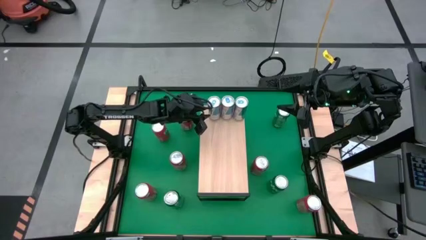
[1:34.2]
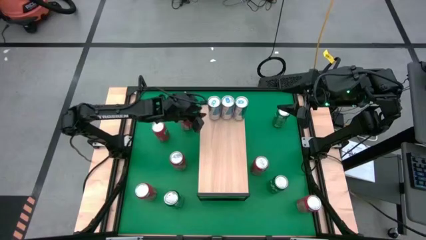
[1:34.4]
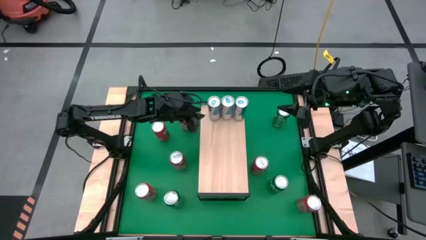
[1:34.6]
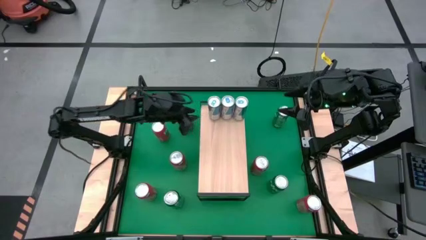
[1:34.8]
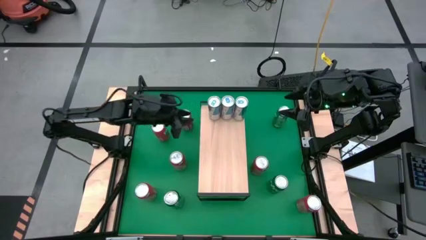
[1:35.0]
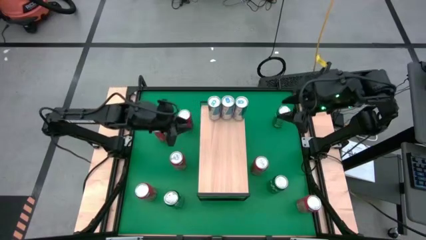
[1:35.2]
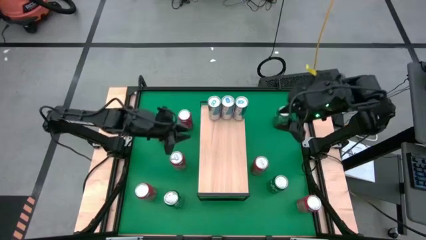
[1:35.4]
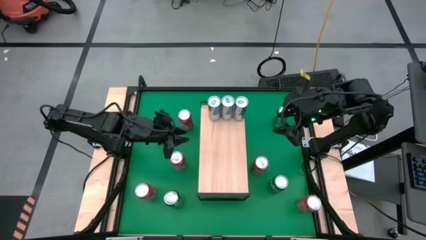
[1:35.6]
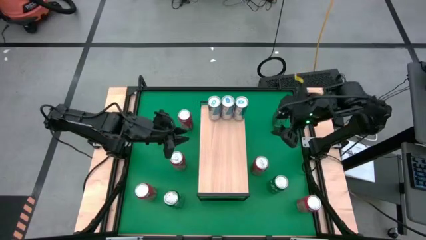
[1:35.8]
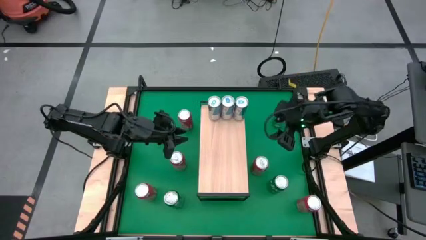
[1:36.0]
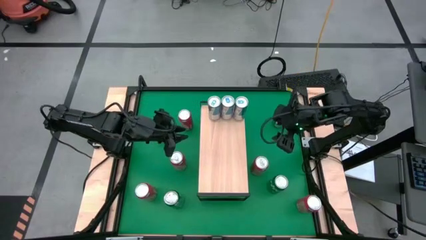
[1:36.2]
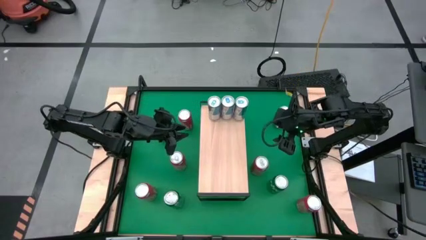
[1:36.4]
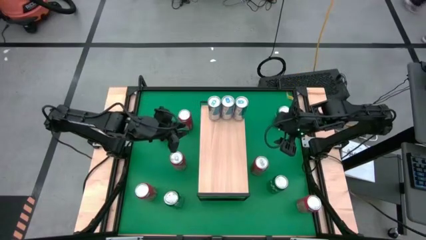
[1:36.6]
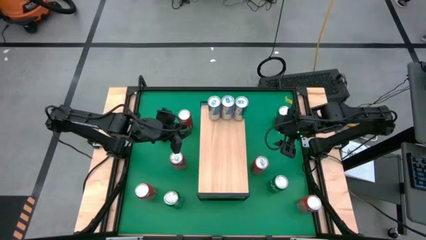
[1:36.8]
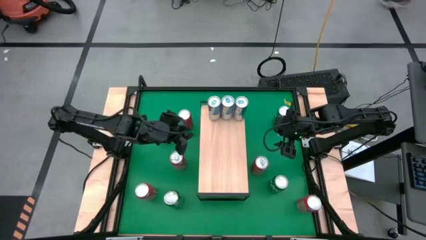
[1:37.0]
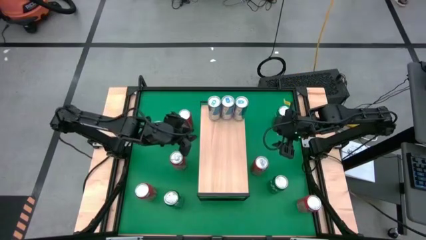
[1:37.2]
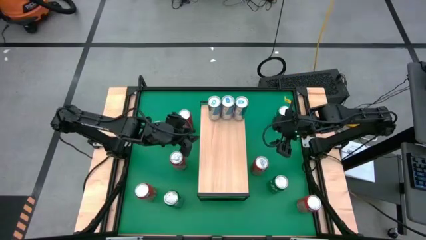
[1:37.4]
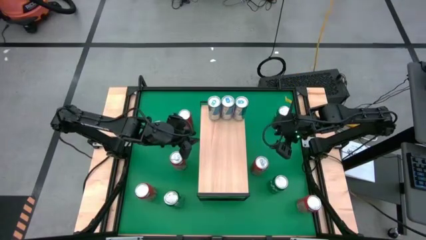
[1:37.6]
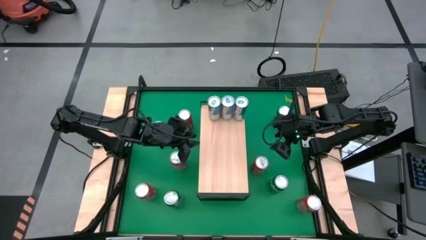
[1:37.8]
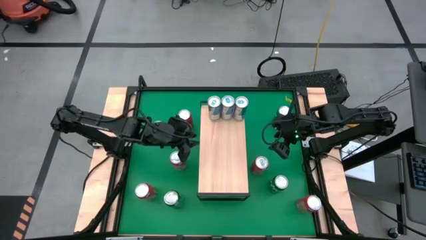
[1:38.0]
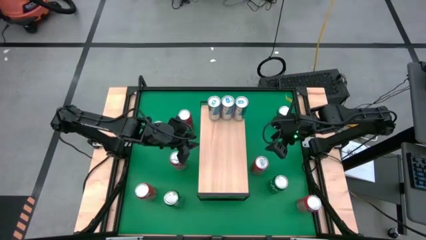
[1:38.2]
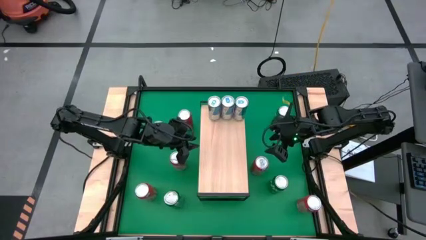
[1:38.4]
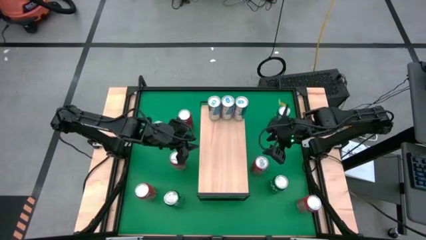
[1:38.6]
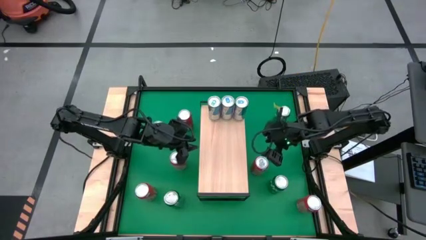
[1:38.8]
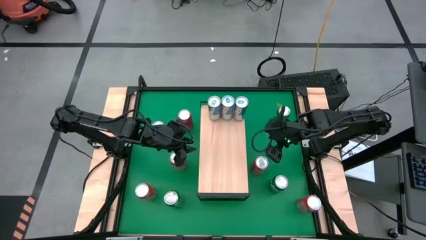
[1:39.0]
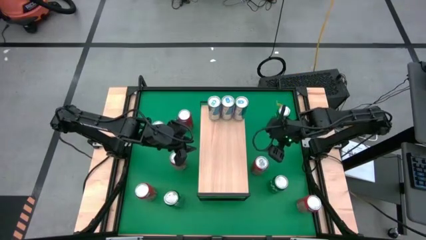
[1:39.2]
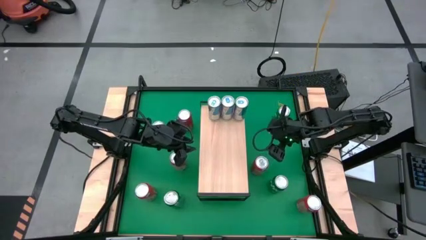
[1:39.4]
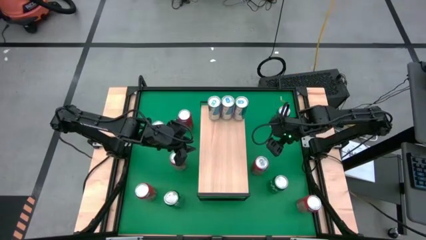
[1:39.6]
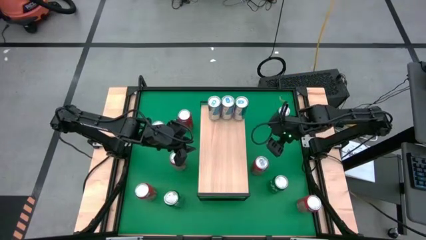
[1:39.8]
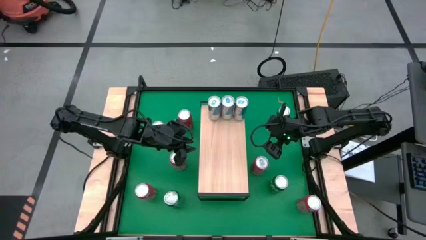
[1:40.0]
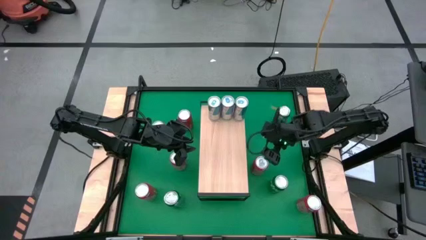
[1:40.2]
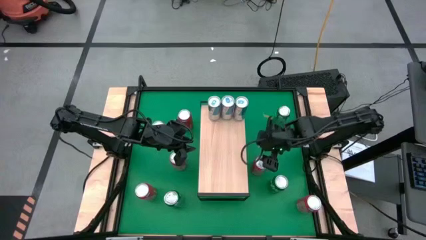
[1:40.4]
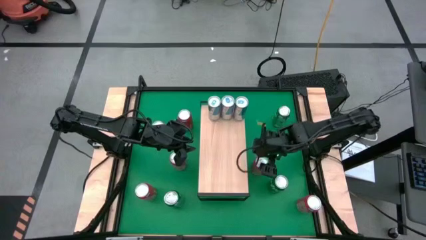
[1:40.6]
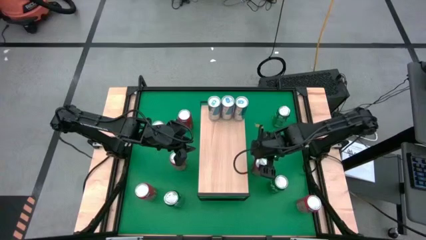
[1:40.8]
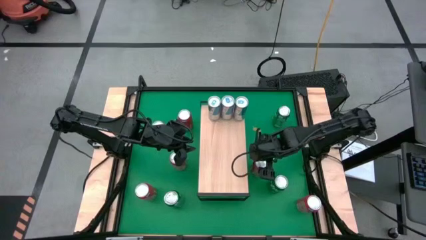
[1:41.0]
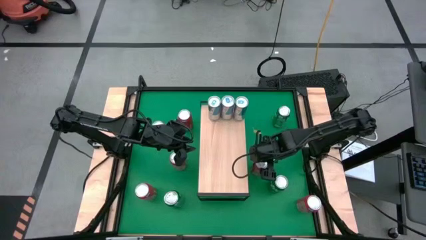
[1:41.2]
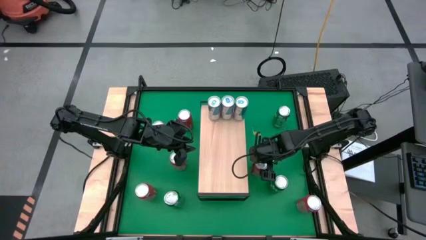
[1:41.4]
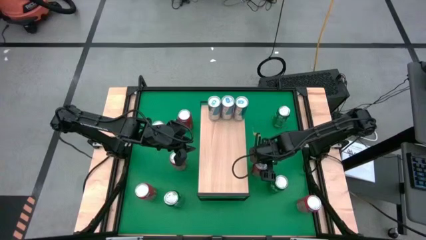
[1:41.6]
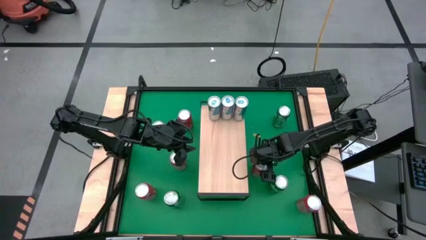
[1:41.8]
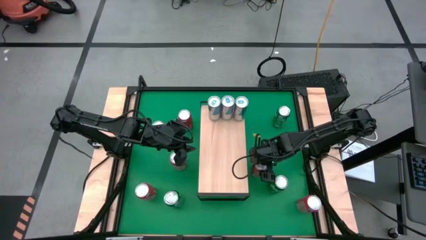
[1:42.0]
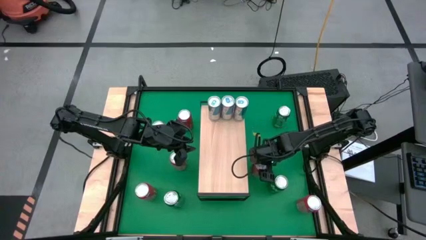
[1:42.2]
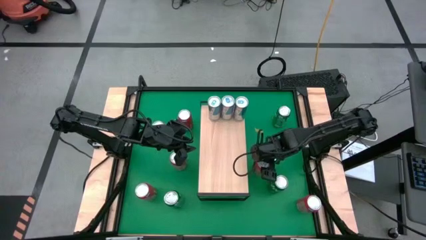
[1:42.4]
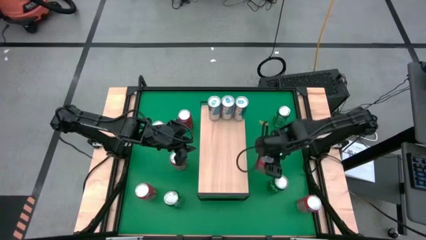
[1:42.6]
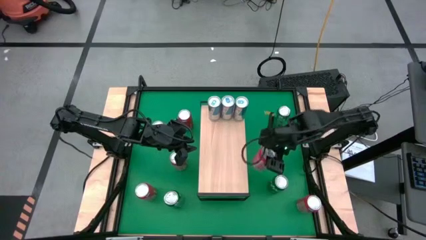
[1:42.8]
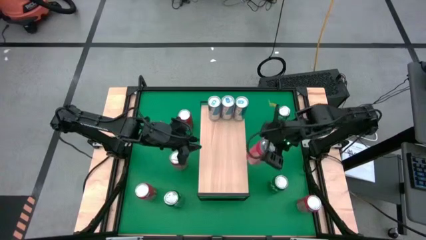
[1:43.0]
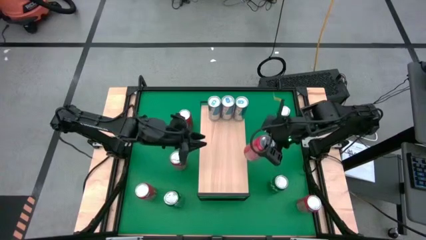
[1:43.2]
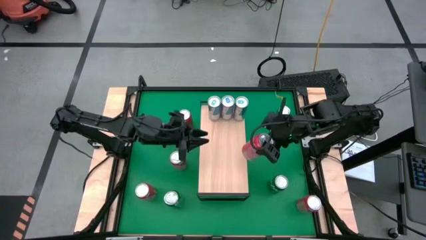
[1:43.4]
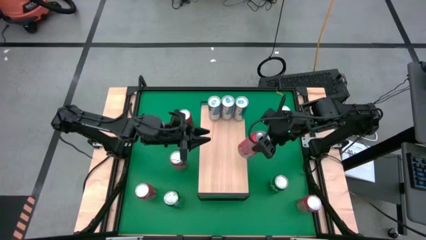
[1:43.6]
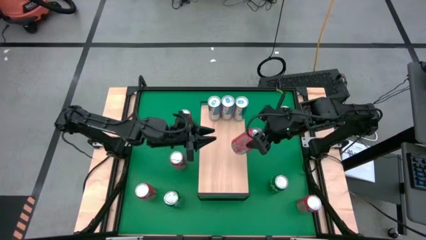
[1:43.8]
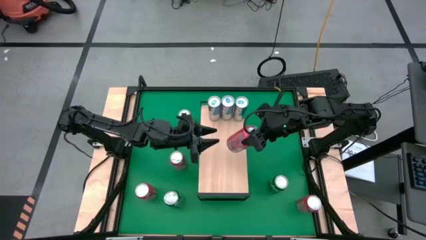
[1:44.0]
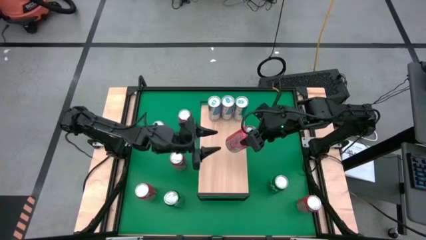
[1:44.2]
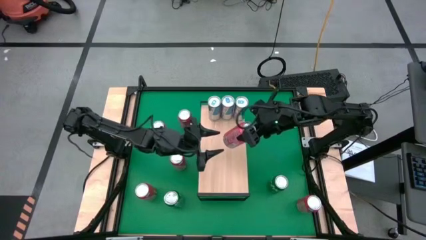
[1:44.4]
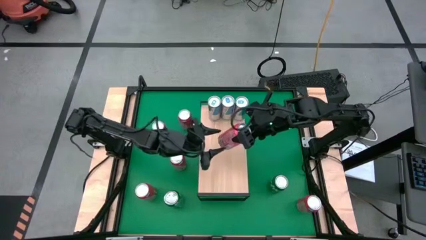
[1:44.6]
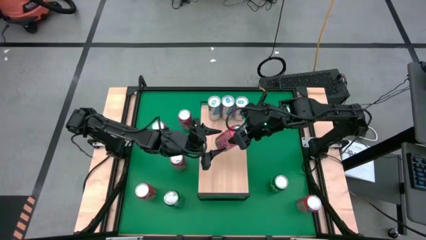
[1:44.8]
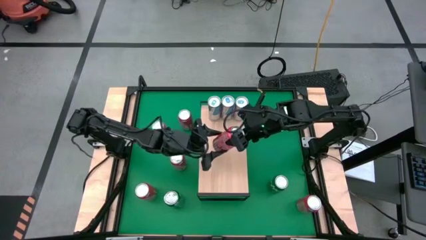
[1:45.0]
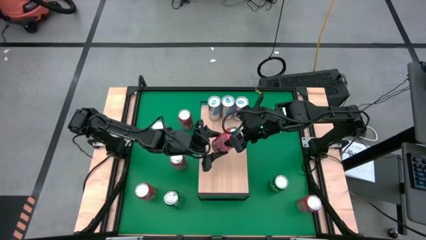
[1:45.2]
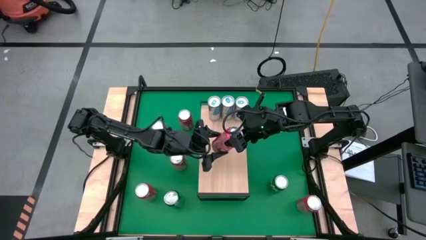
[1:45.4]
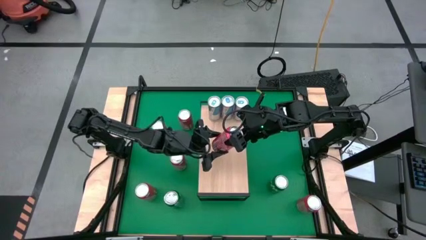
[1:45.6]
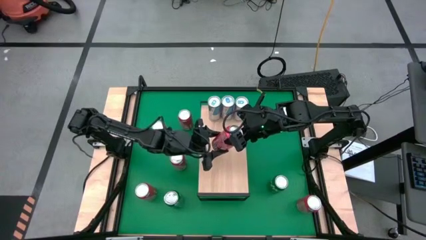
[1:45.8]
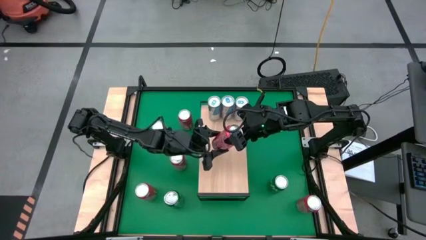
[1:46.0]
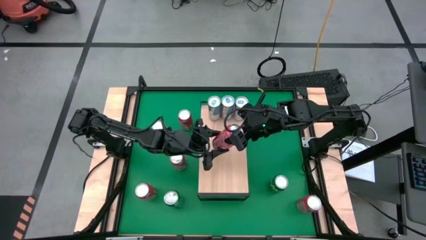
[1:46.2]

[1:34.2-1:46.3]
Task: Place canned beverage on shelf
Put the orange soda can on the shelf

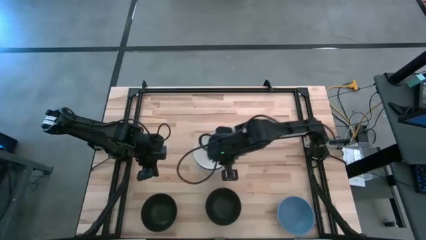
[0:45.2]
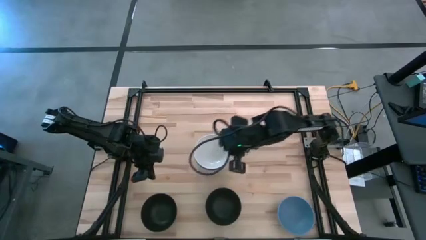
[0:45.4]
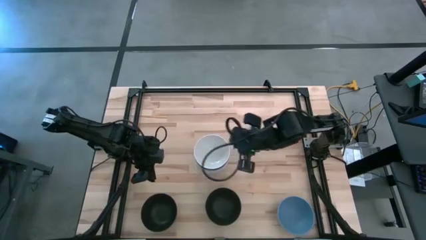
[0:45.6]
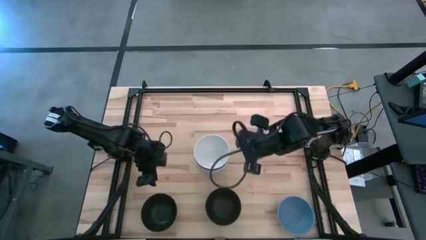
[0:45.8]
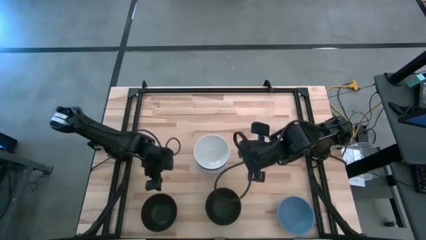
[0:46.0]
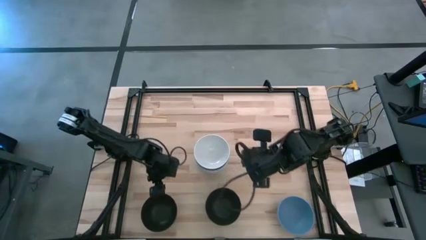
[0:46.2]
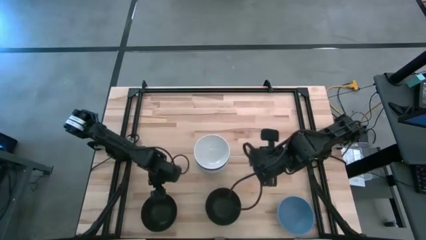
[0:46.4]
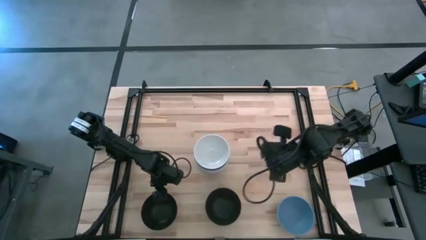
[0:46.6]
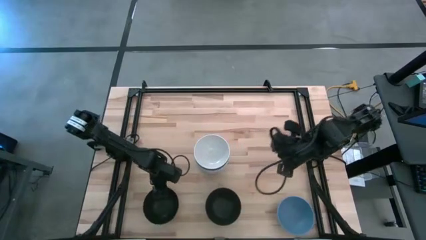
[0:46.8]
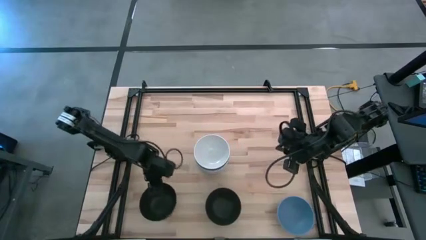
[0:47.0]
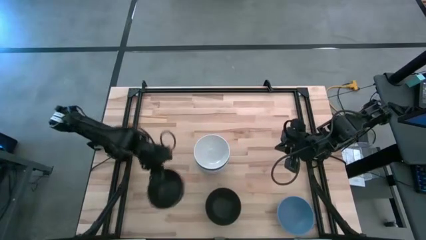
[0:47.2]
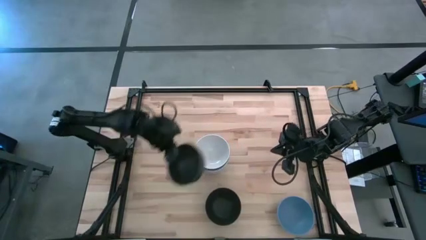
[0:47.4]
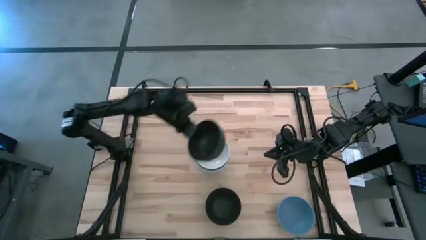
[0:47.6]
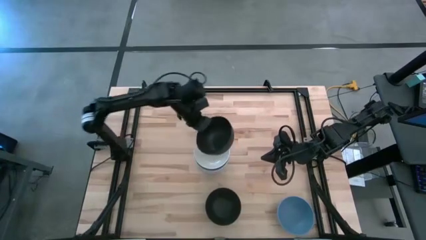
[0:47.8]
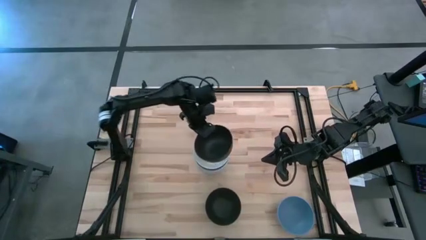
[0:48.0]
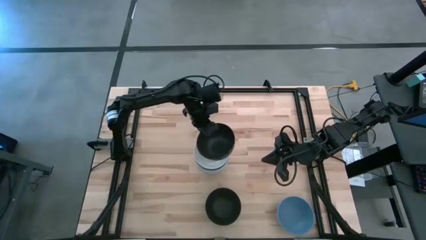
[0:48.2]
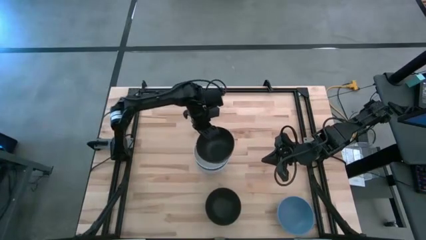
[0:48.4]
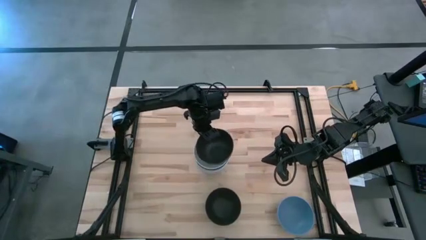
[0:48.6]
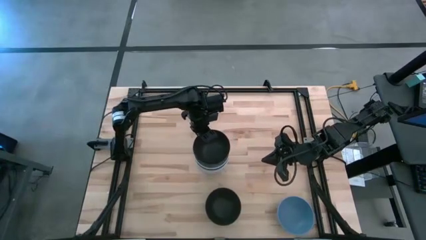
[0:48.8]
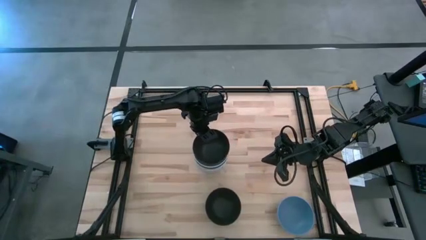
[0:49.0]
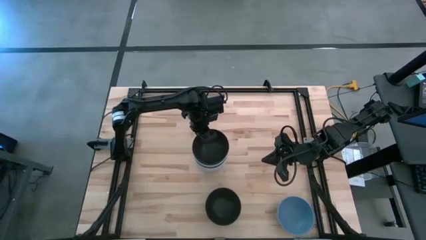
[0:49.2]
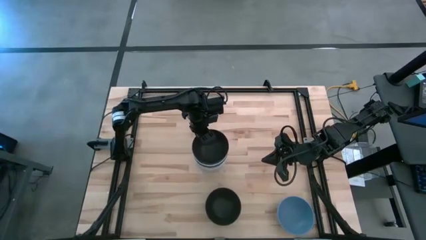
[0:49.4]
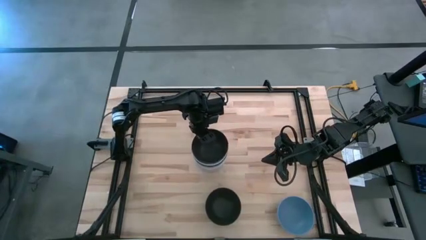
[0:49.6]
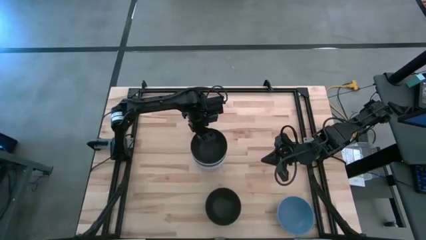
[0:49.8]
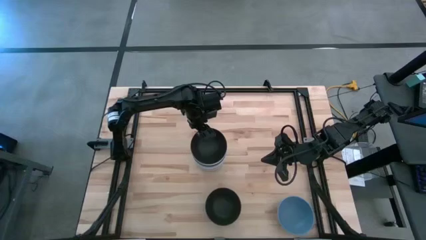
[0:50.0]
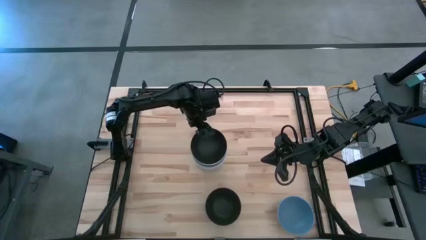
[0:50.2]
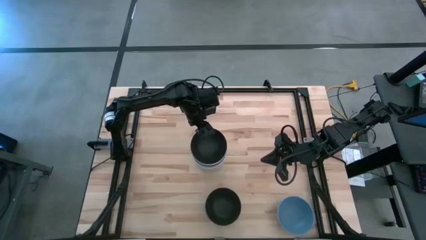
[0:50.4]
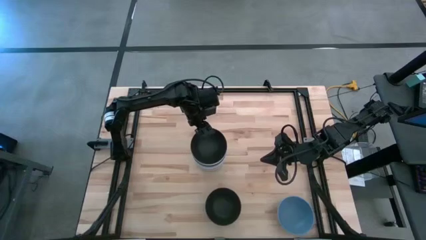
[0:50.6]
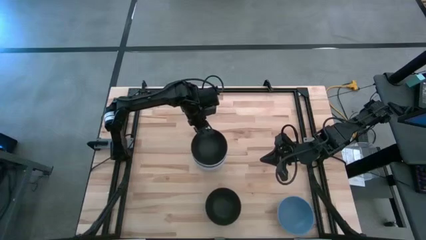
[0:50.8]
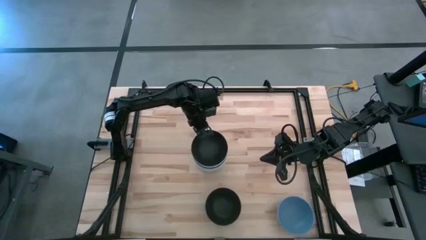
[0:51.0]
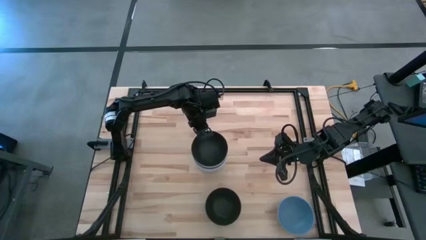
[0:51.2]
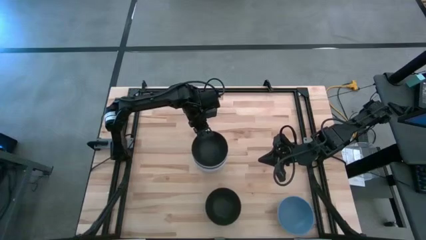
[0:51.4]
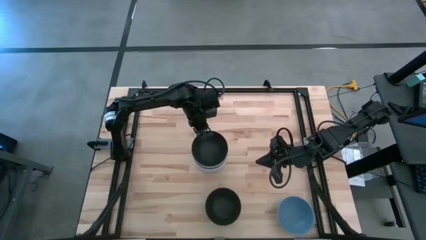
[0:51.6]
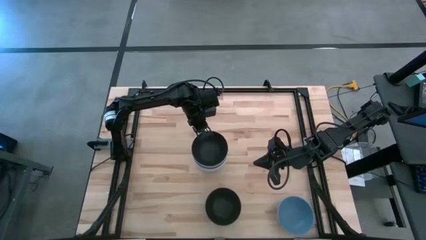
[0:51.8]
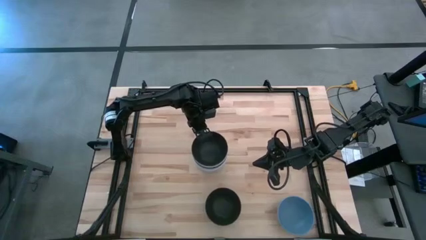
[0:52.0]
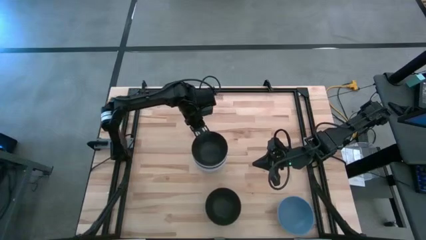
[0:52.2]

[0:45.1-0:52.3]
Task: Nest bowls inside each other
Stack the left black bowl on top of the white bowl
